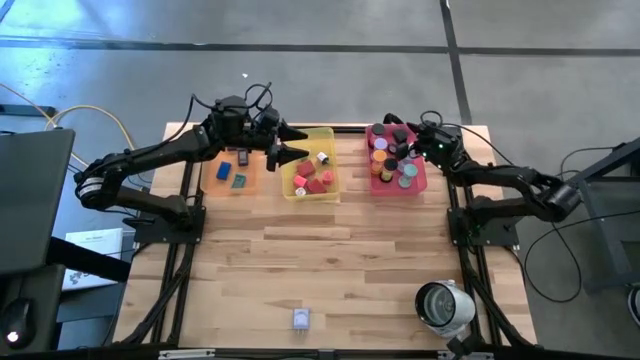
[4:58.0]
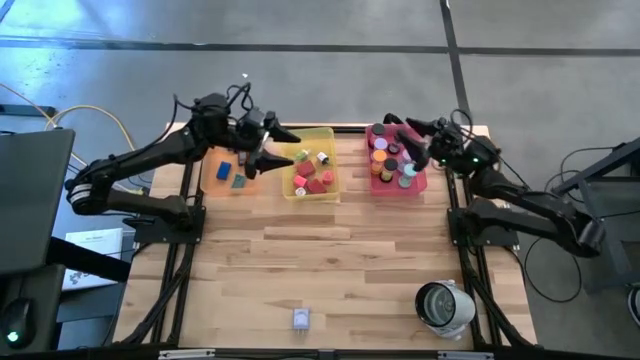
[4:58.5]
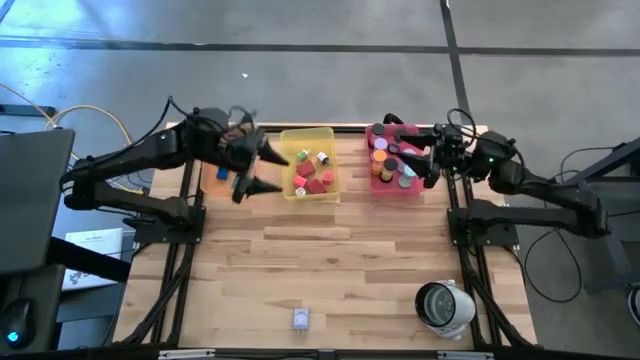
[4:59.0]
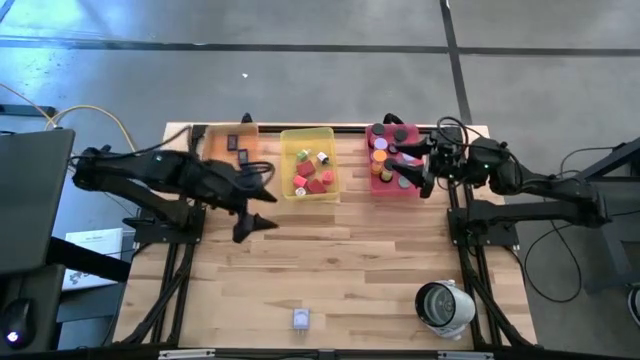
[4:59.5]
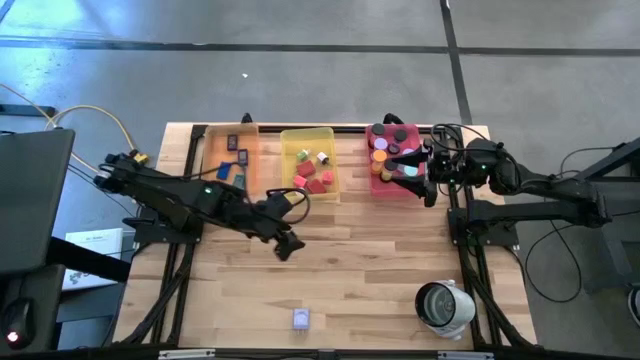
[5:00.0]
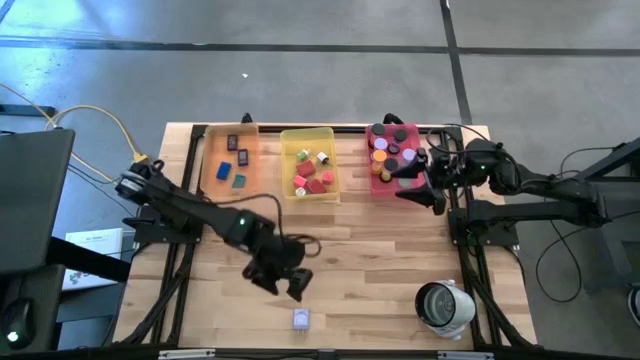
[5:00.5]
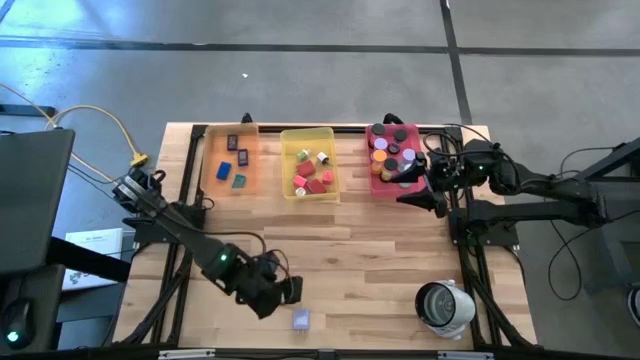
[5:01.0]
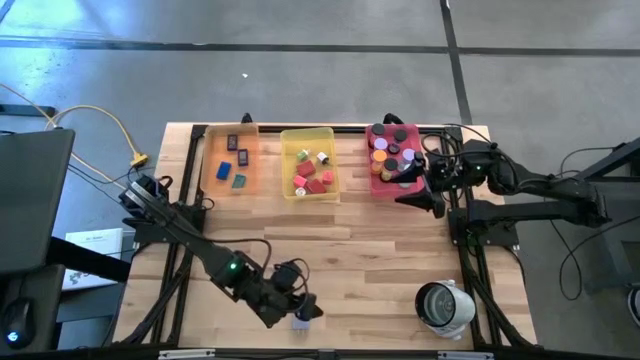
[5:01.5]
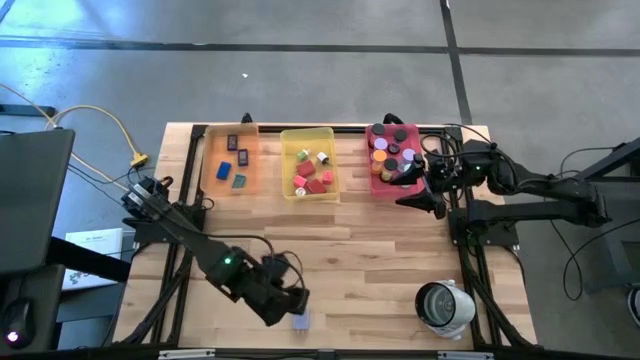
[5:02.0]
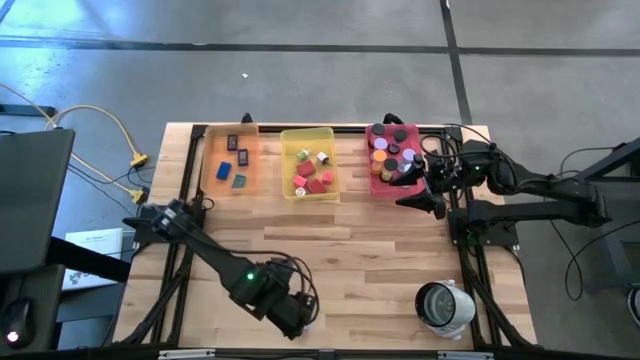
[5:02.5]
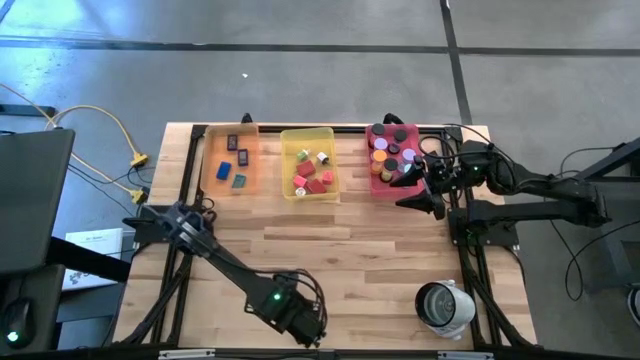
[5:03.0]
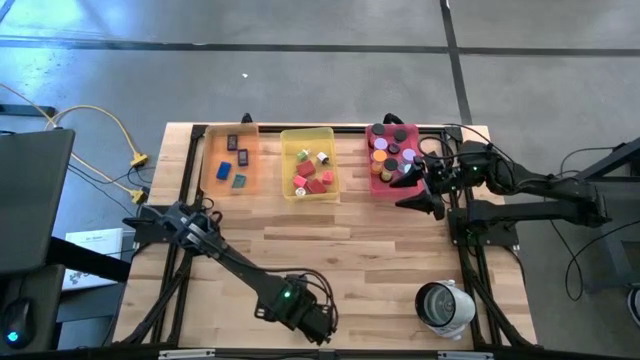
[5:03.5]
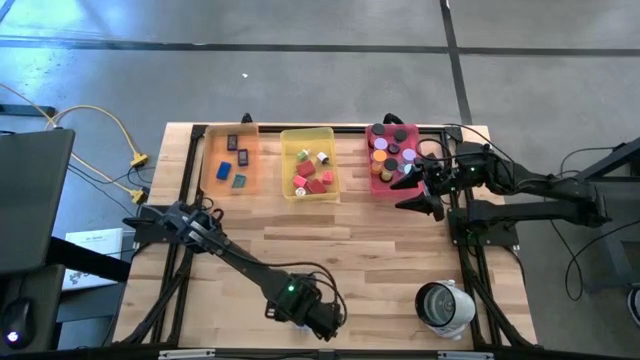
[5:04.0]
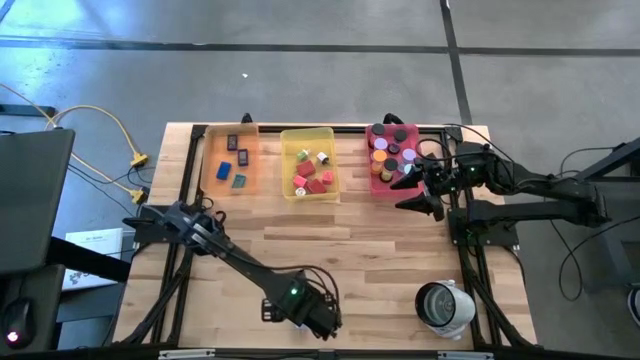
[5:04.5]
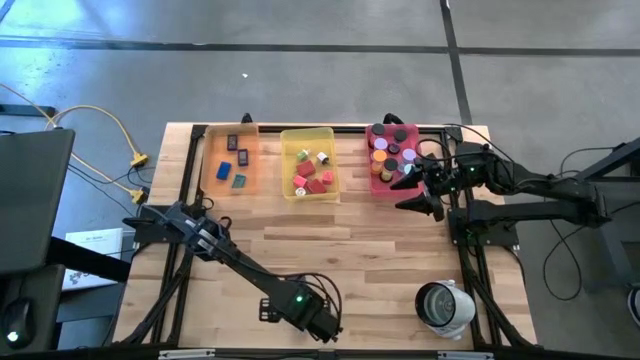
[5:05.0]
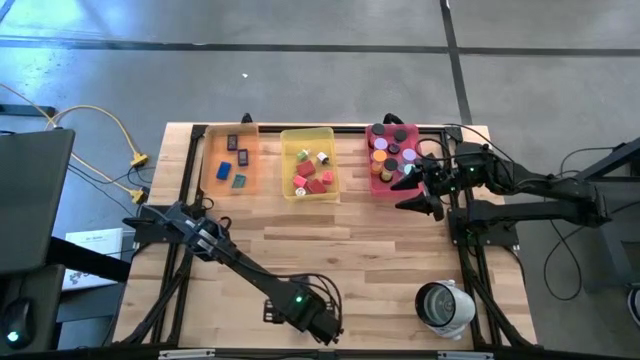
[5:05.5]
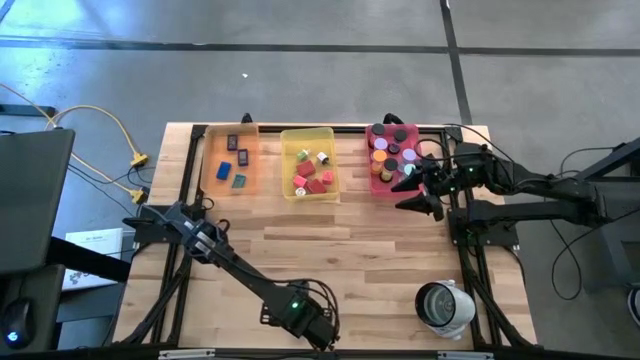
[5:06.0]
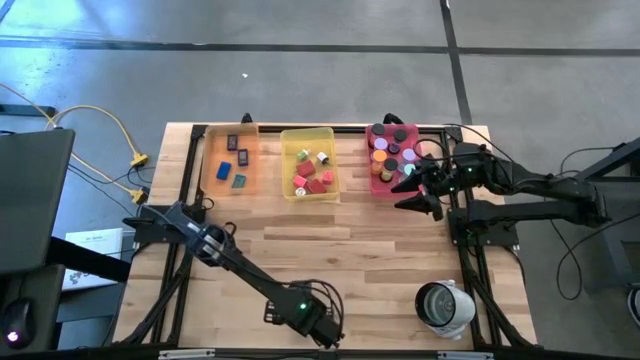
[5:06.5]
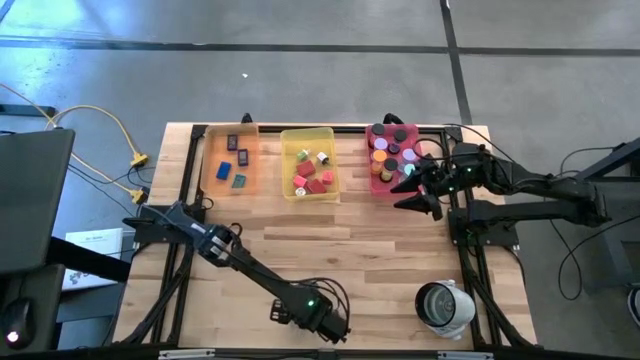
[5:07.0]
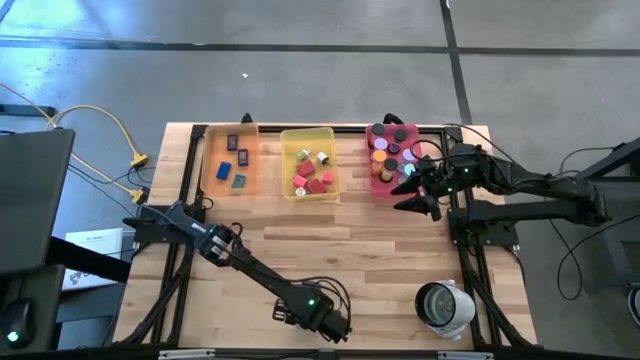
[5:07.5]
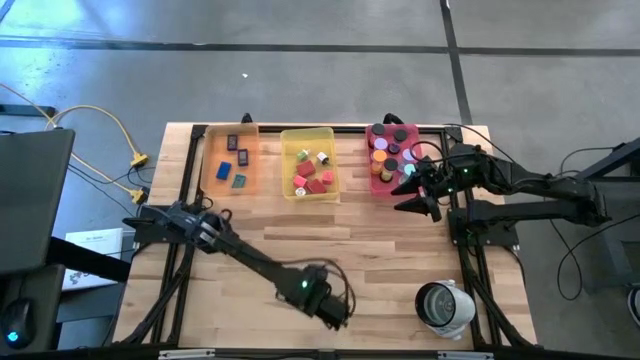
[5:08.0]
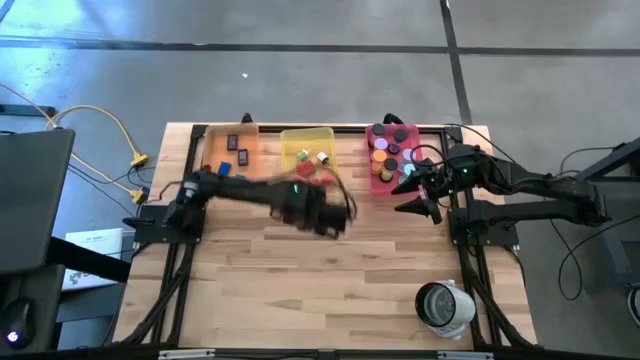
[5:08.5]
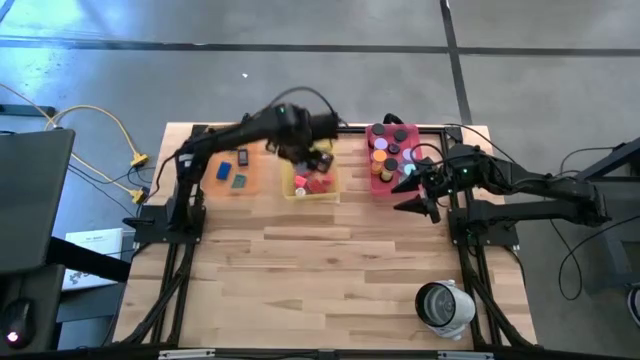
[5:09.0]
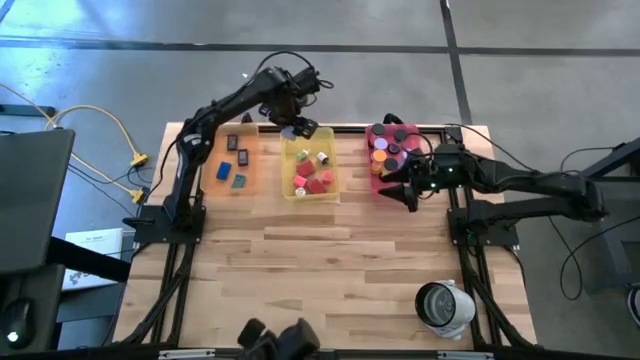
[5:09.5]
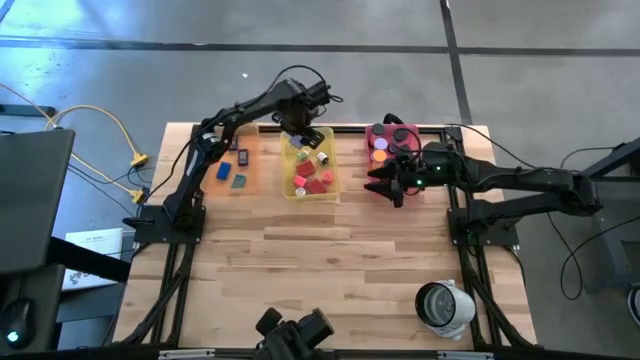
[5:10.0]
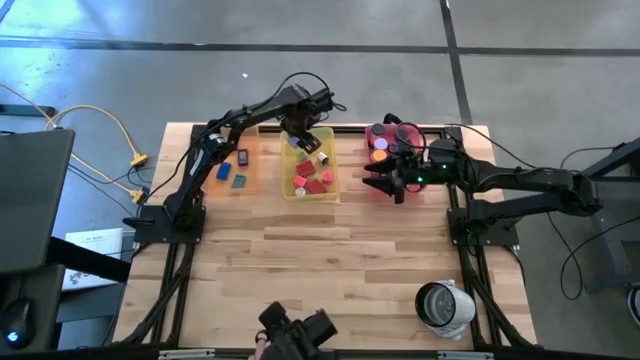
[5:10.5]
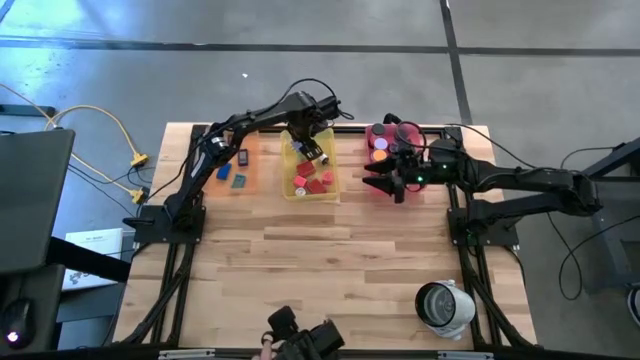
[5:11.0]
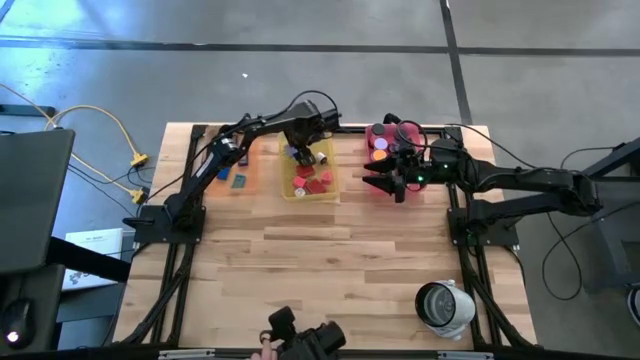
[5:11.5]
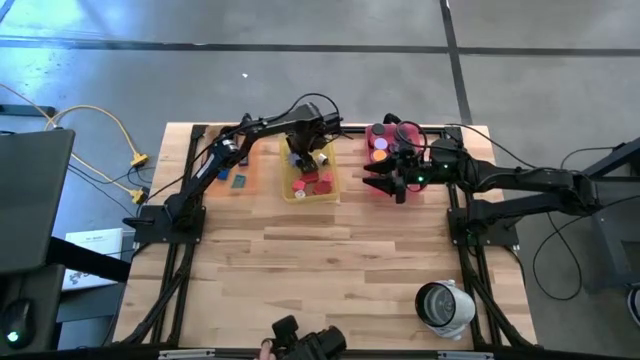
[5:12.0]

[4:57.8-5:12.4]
Task: Pick & Place Office items
Put the purple charger adapter into the yellow bin

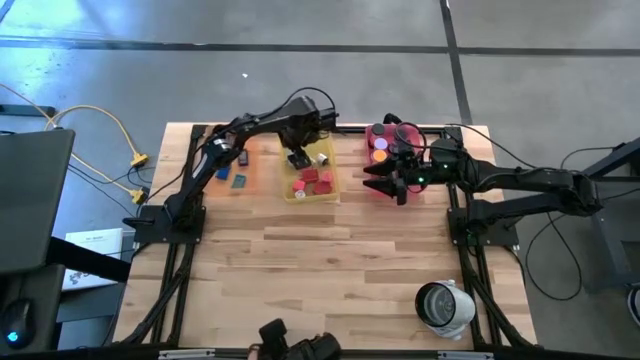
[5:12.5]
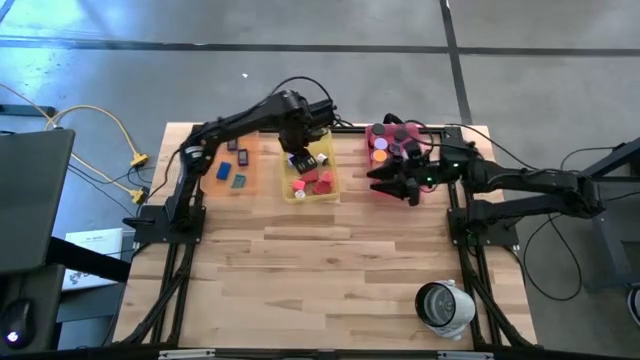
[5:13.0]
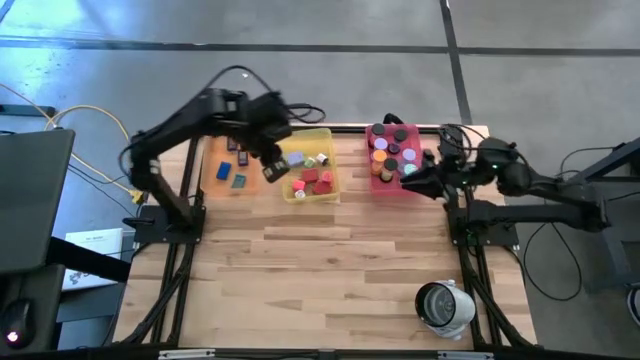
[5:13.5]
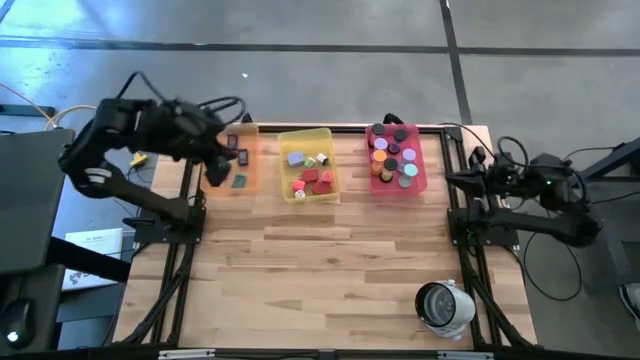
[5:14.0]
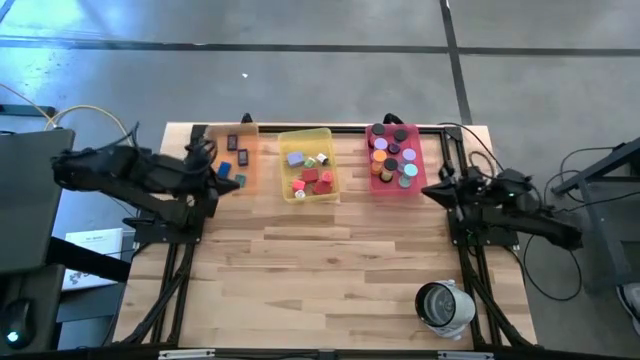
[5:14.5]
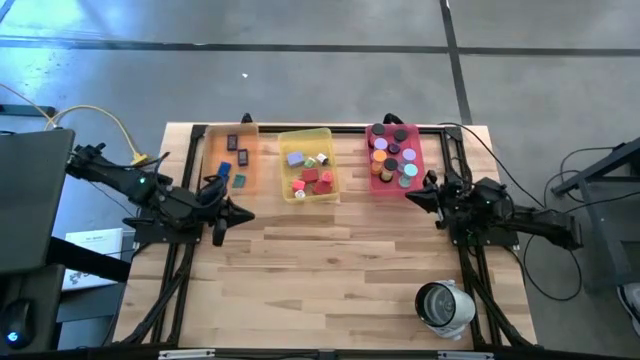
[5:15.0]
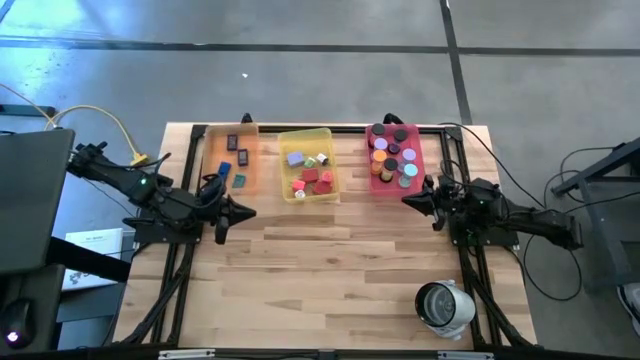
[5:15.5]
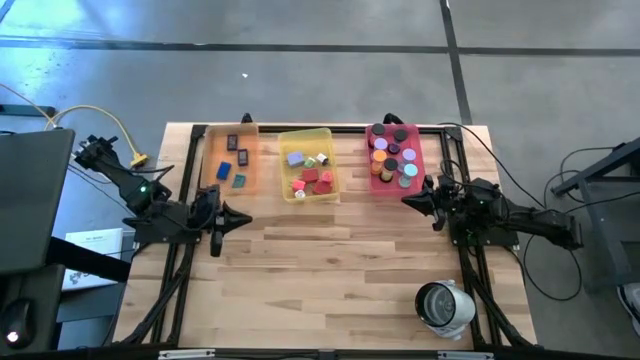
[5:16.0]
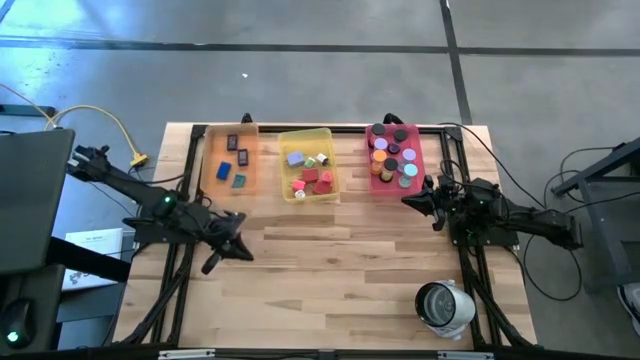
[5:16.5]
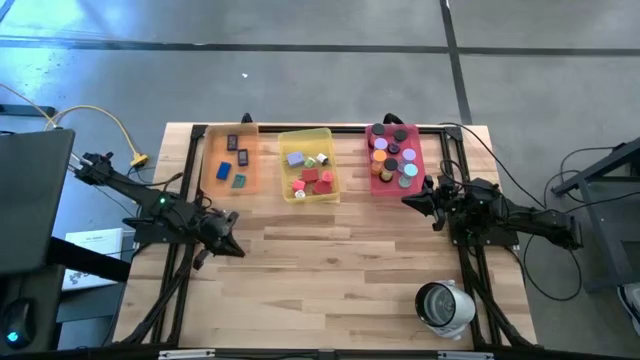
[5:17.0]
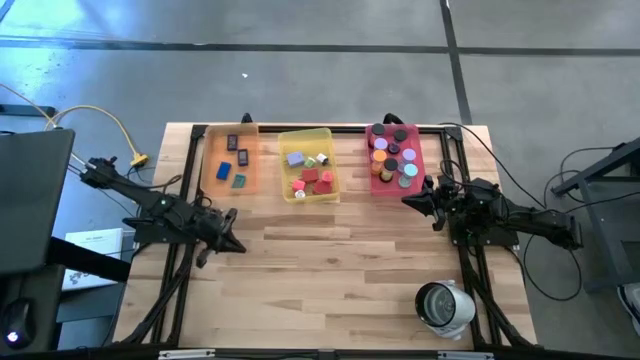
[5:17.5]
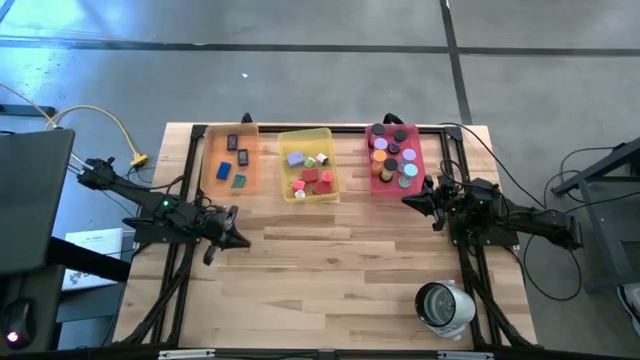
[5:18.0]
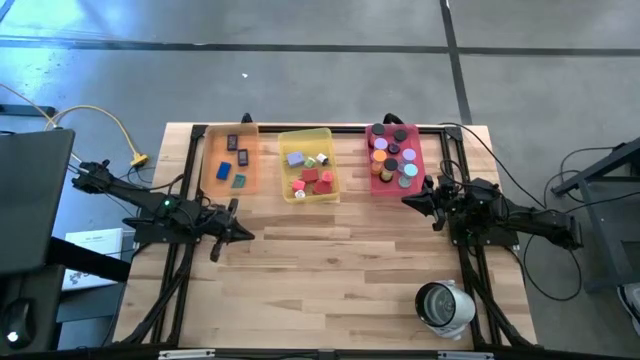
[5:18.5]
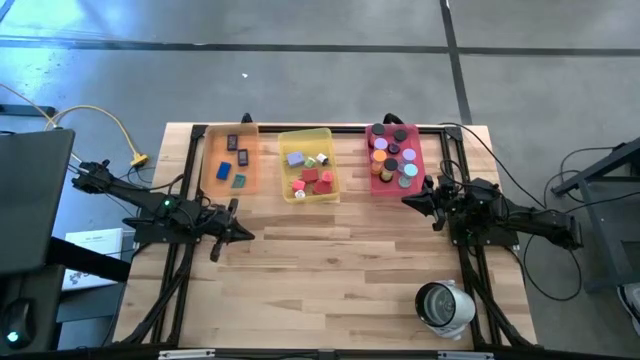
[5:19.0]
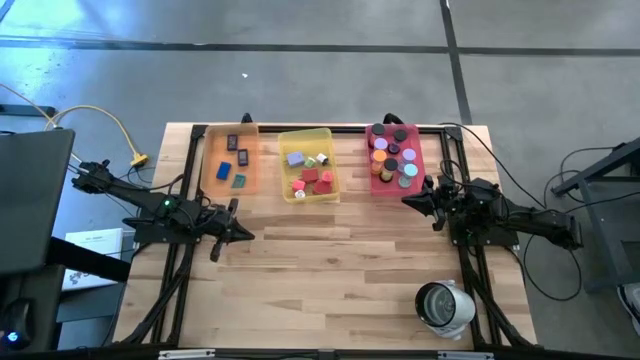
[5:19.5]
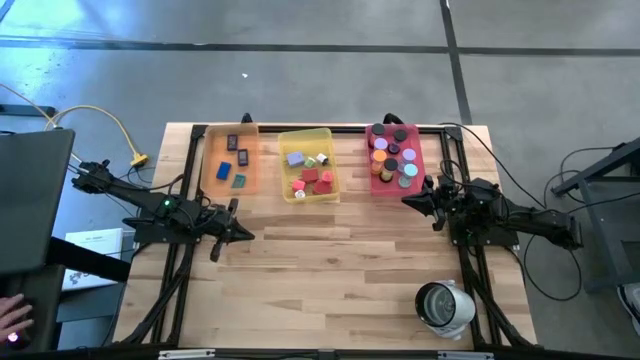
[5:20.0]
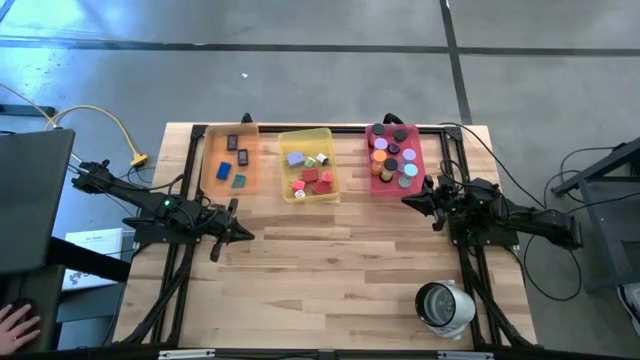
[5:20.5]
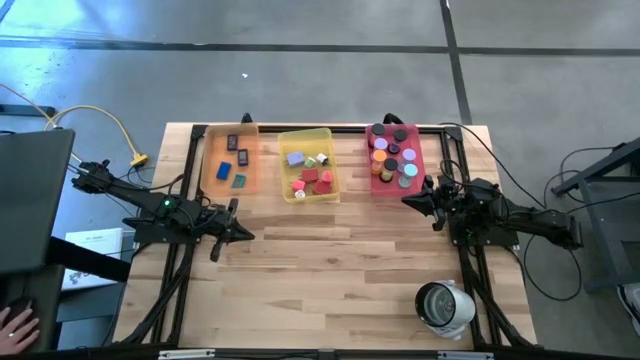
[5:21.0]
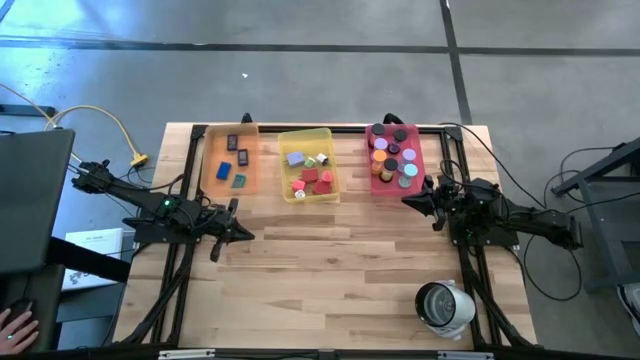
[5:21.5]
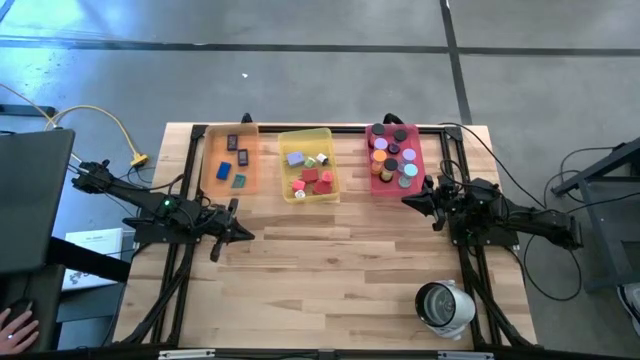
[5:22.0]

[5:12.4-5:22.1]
Return to Home Position
